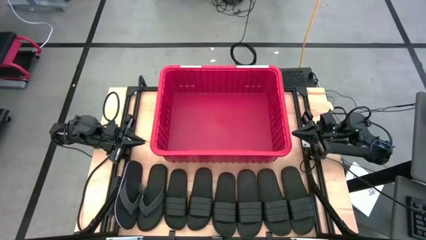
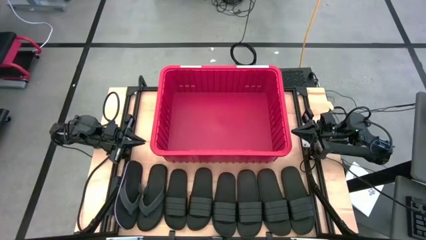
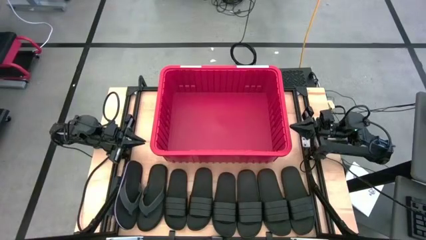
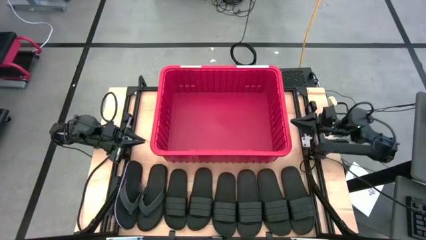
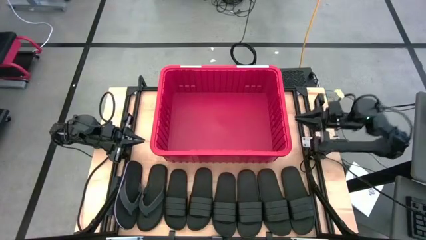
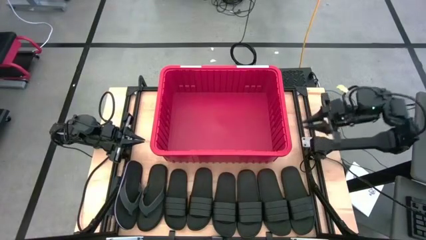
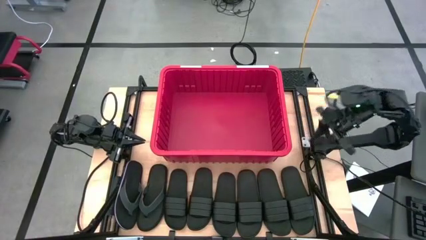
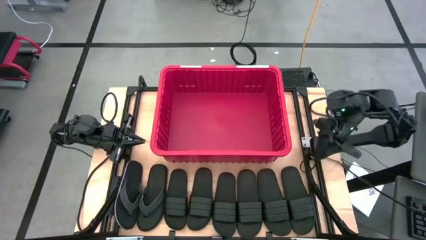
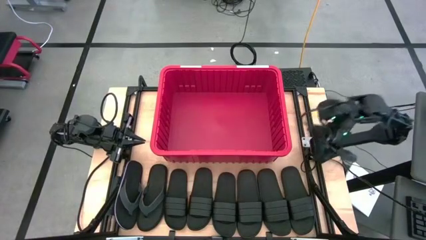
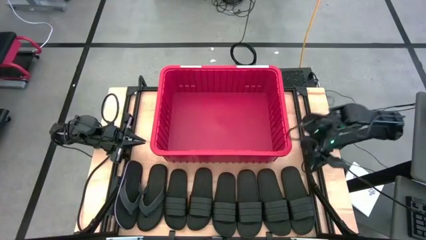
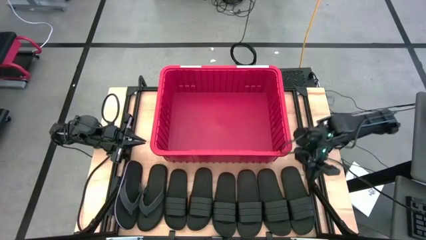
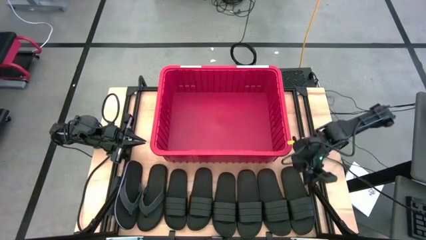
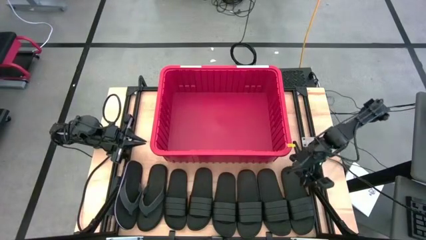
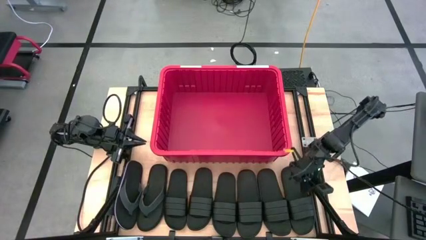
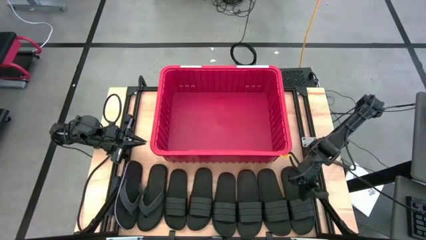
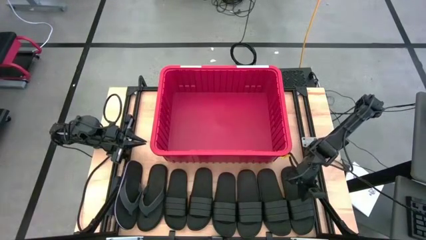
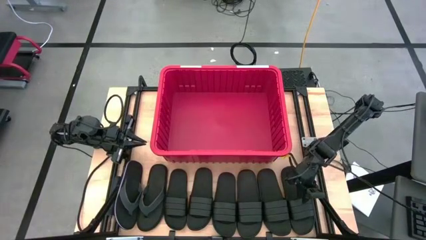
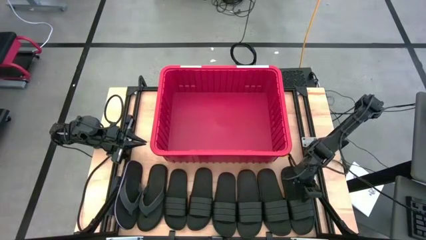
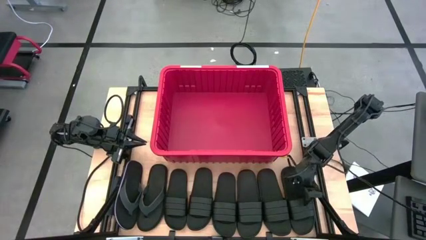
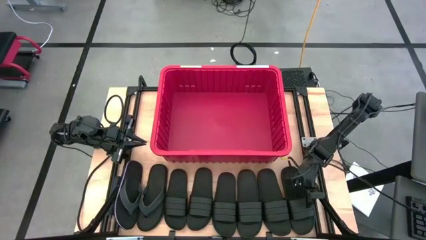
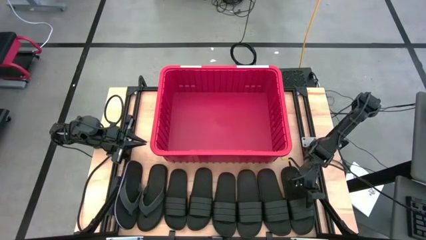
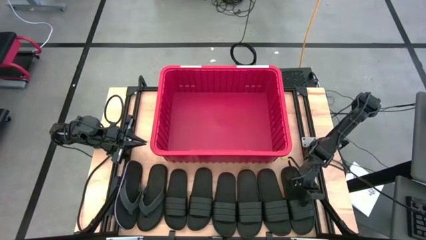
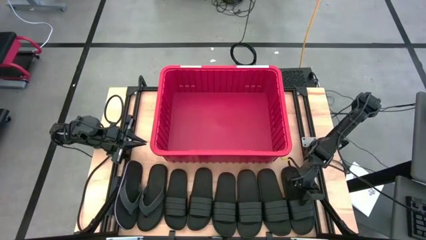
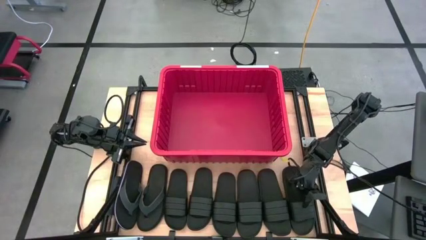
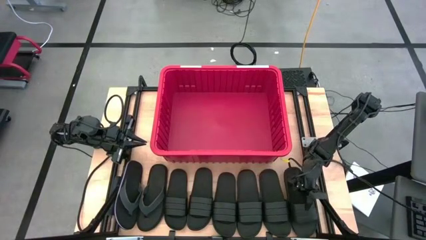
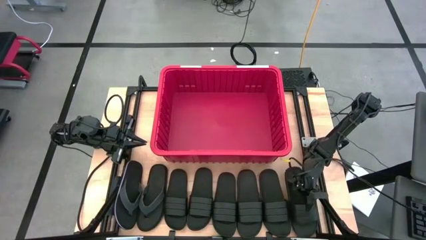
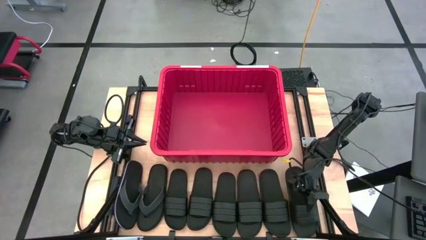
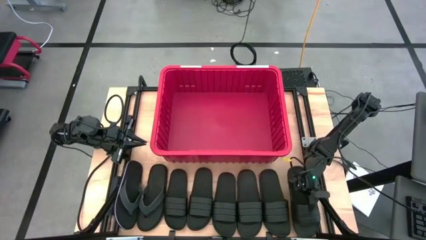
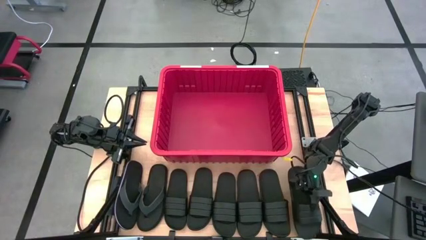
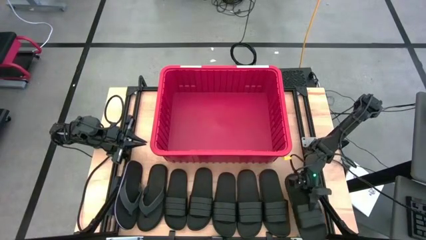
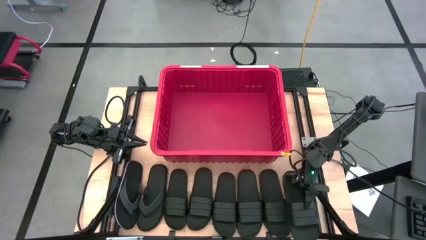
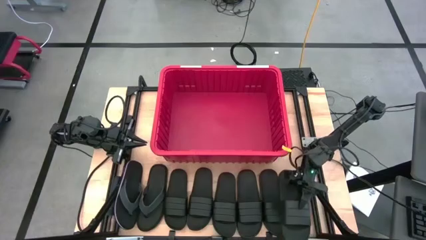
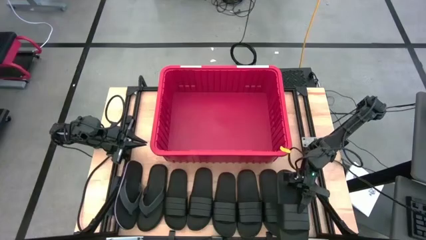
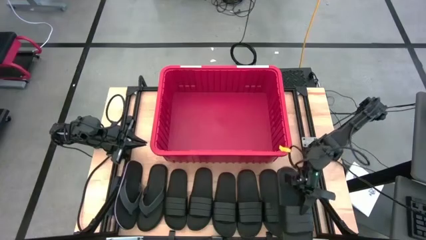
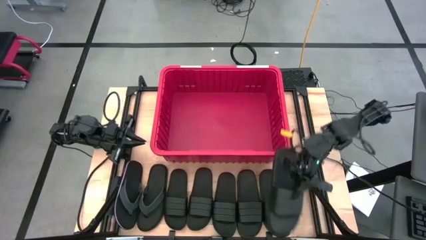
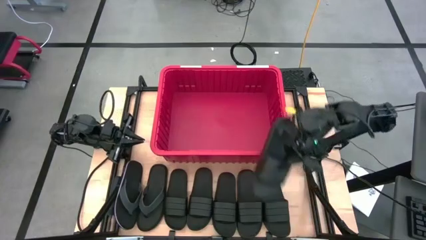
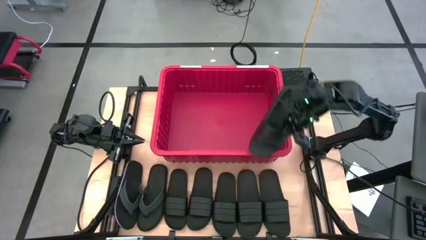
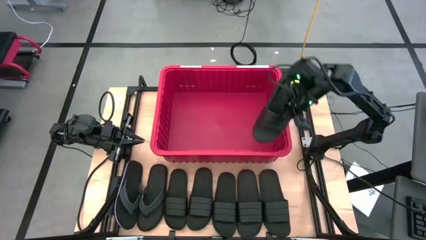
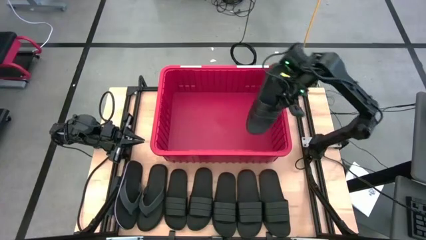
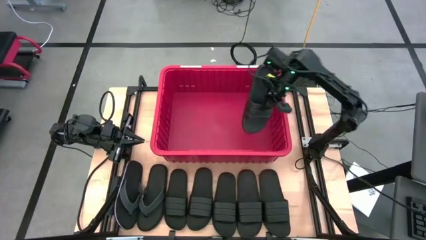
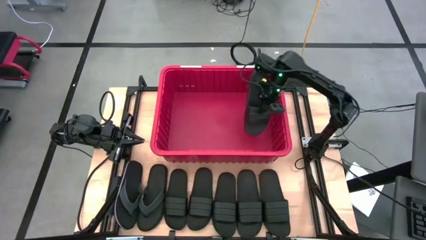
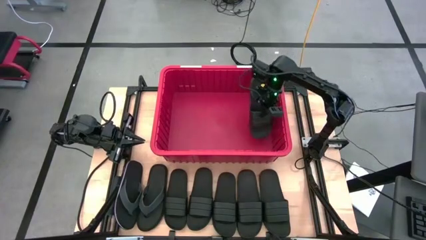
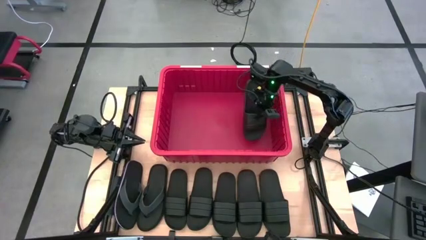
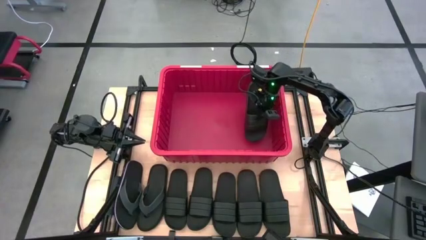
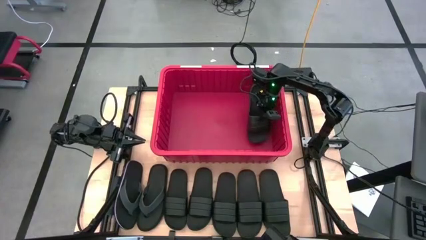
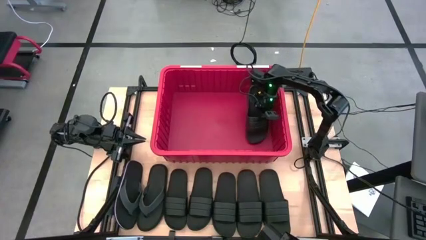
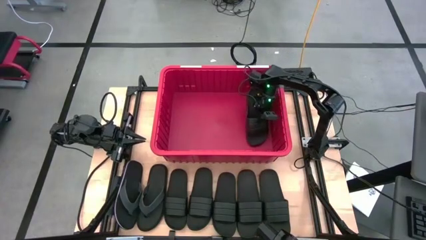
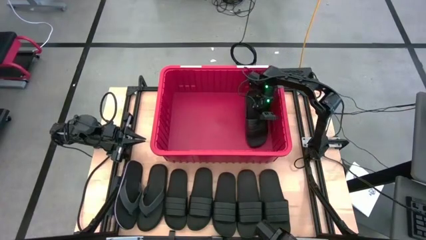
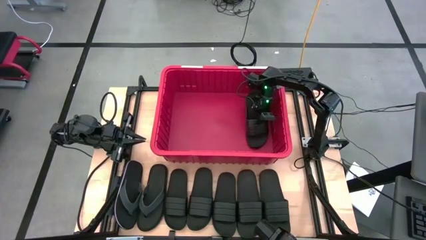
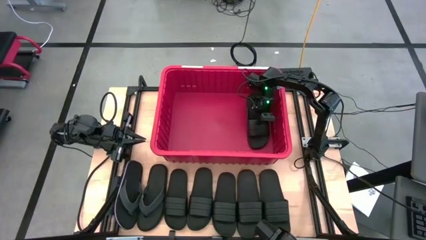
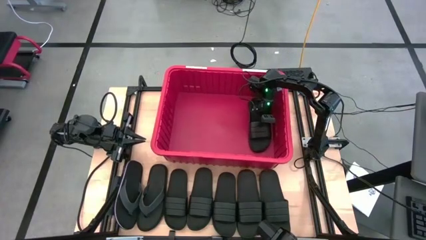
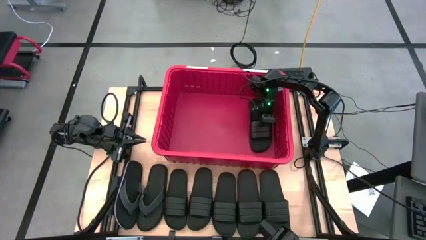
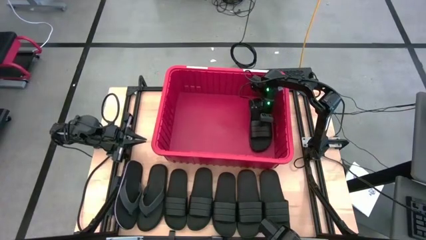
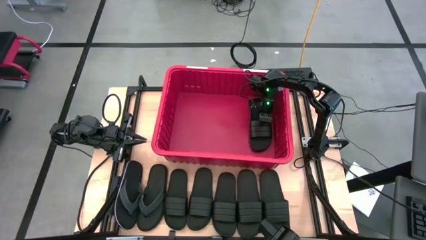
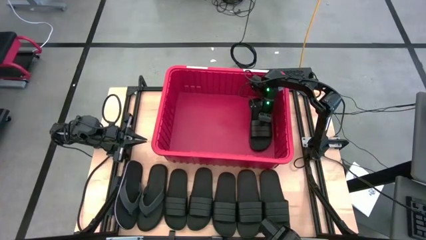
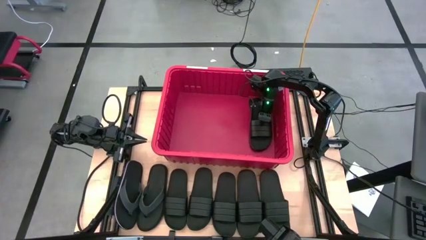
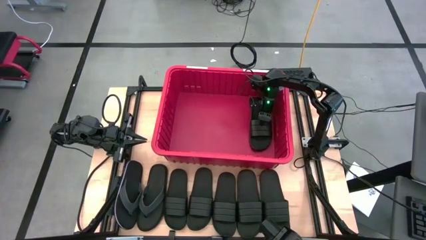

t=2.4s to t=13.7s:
Task: Pick and place slides into bin
Put the black slide into the red bin

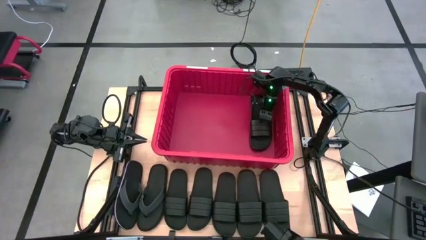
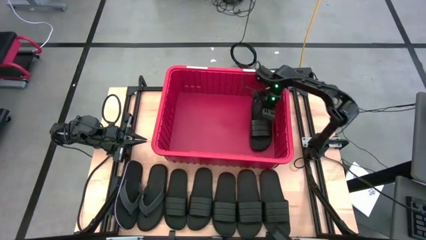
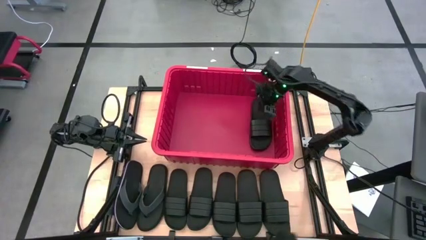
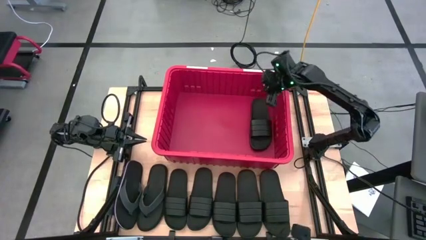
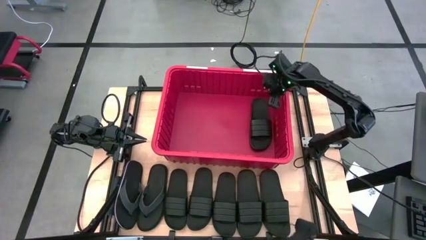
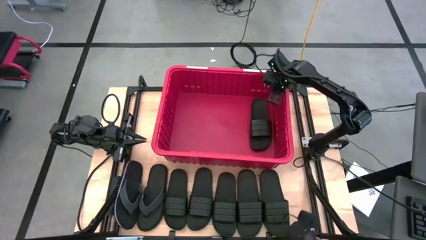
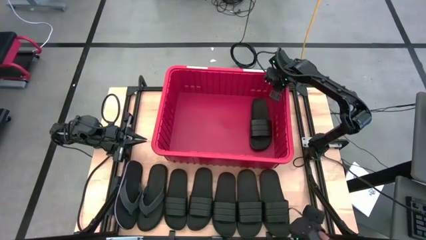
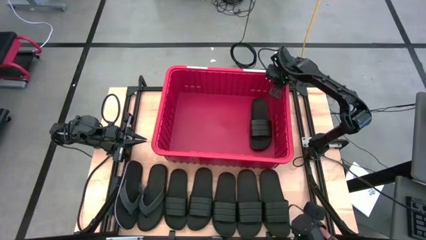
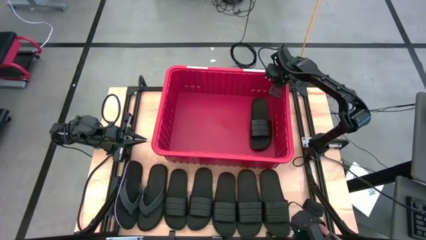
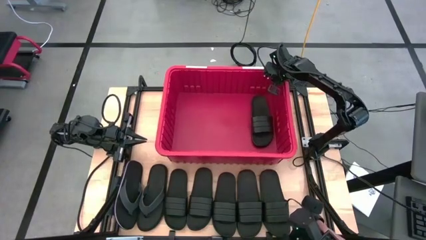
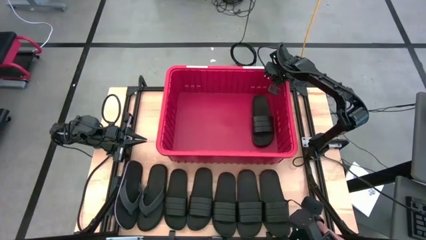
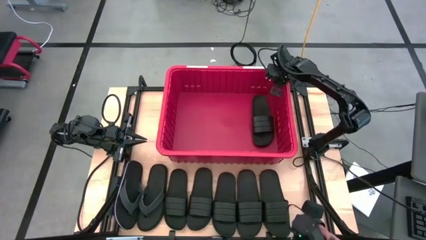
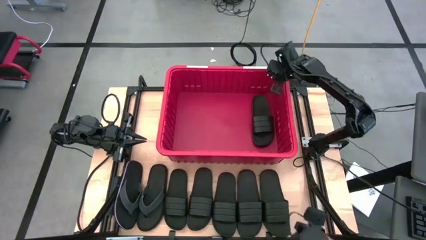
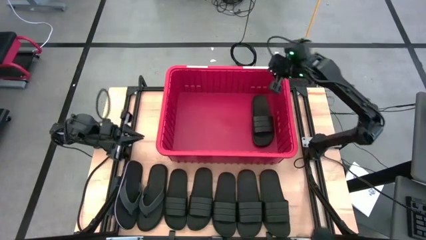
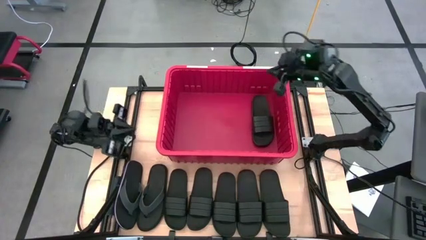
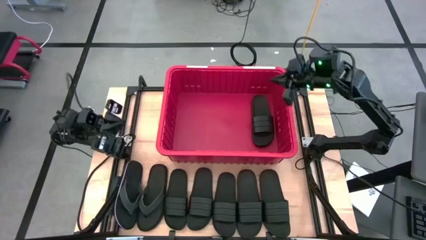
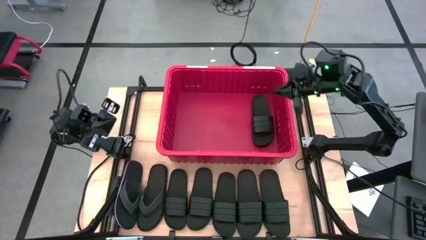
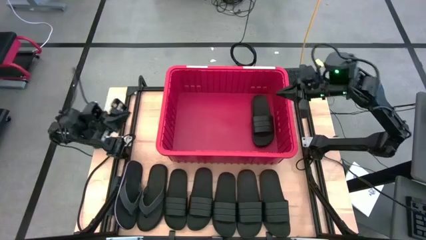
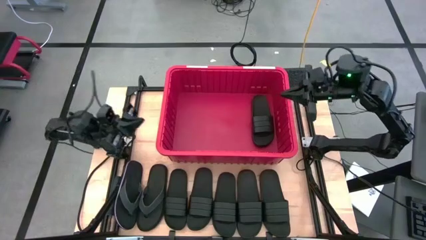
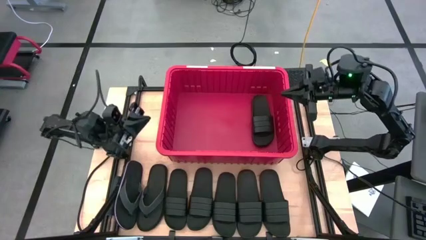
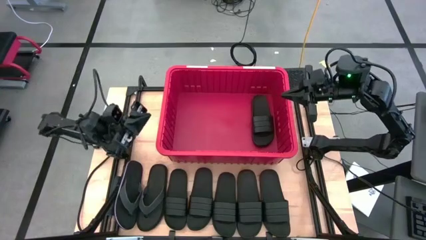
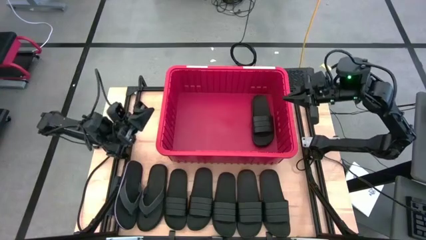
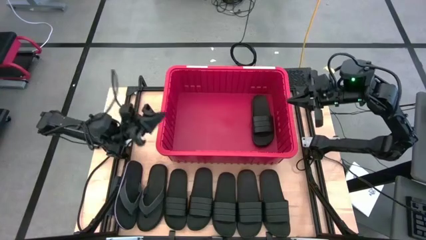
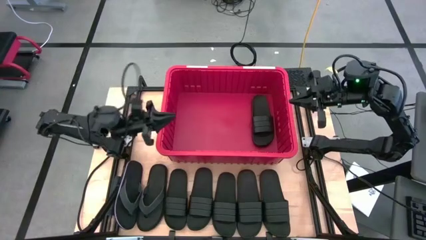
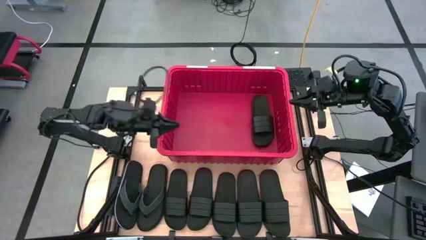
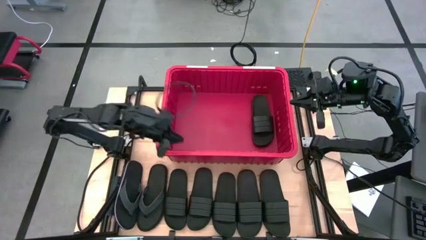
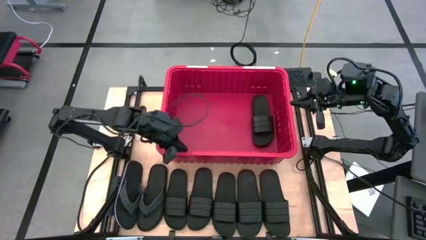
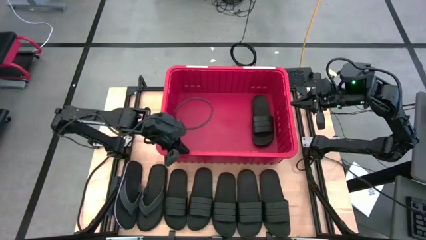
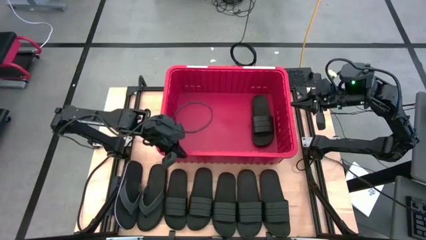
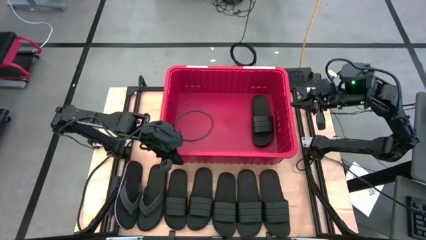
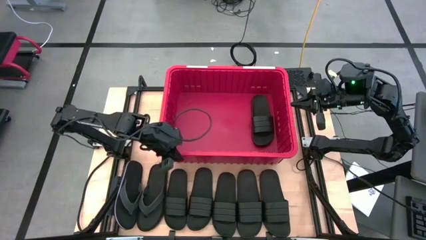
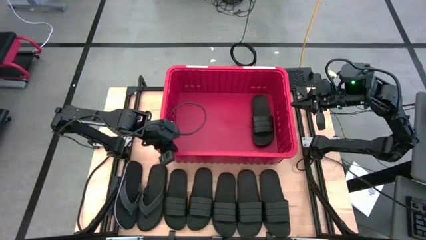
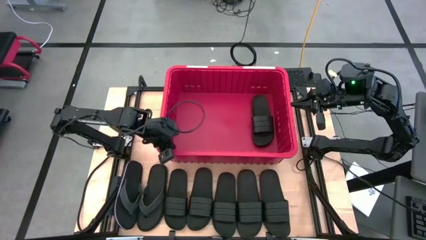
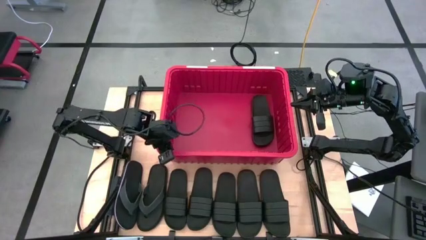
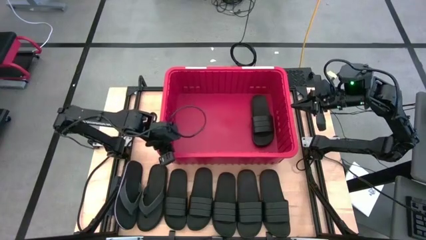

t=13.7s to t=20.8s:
Adjust the red bin
